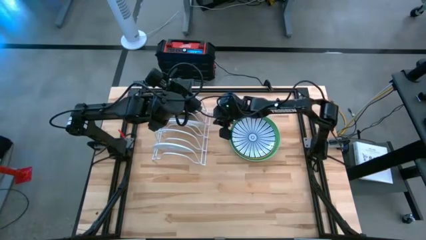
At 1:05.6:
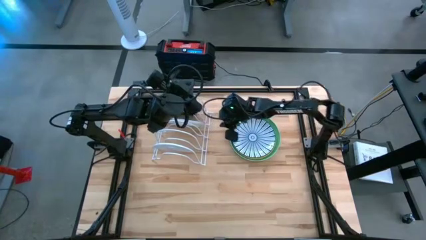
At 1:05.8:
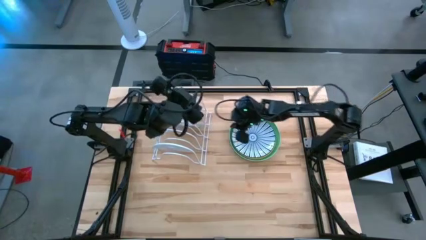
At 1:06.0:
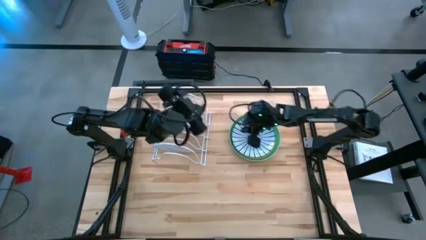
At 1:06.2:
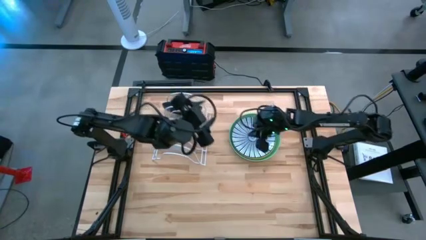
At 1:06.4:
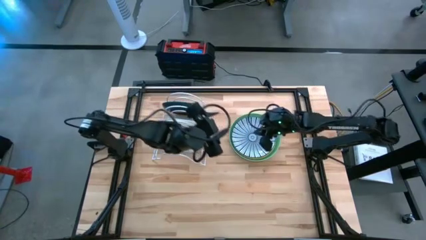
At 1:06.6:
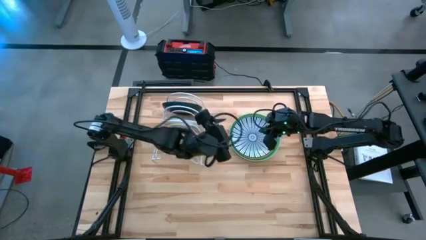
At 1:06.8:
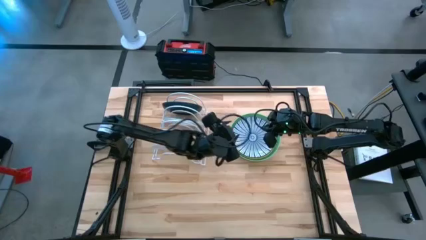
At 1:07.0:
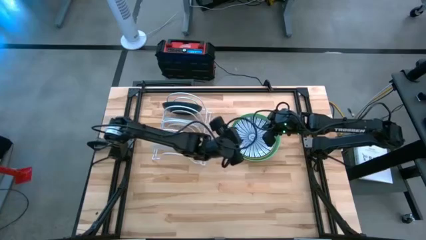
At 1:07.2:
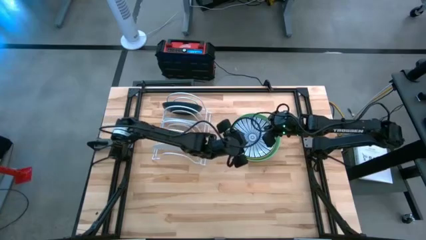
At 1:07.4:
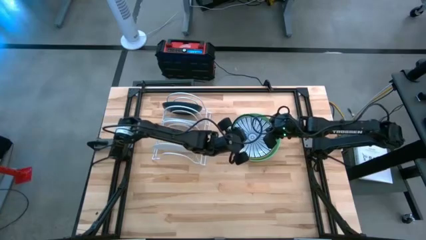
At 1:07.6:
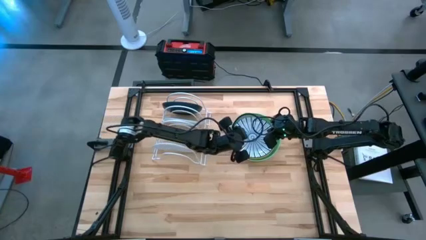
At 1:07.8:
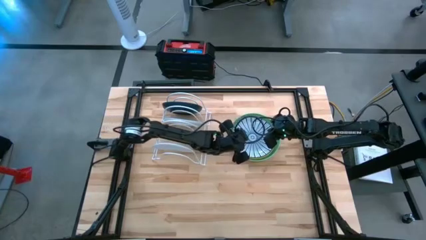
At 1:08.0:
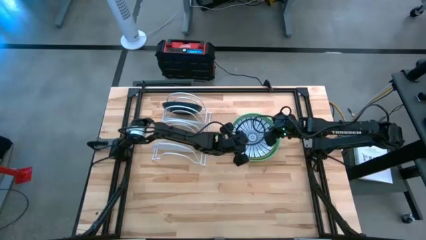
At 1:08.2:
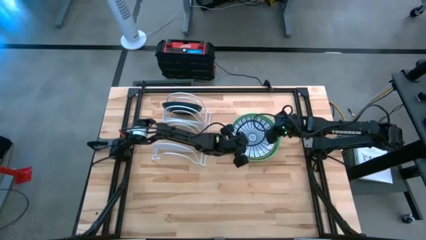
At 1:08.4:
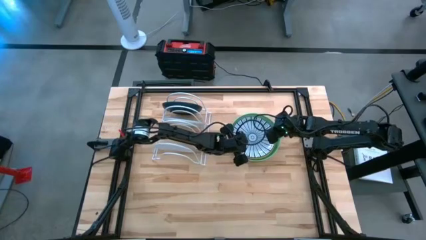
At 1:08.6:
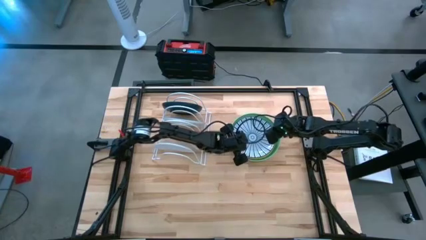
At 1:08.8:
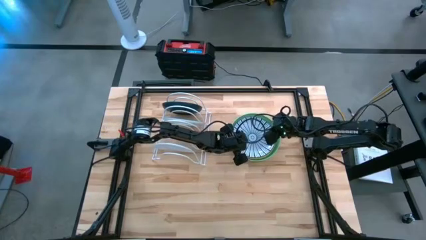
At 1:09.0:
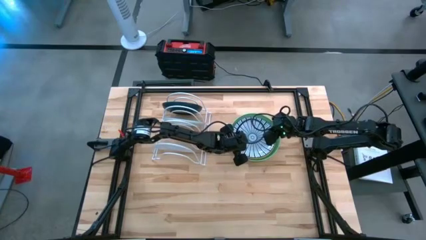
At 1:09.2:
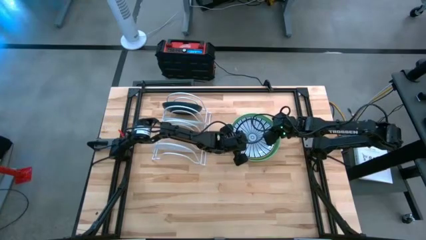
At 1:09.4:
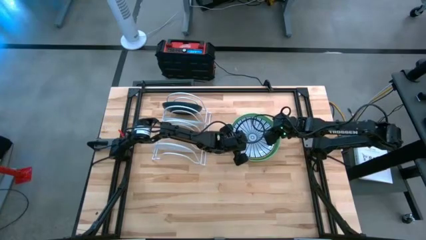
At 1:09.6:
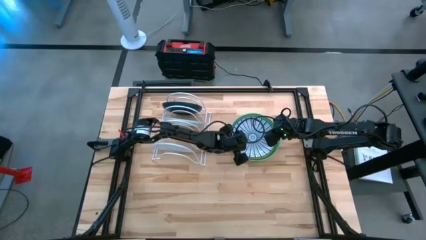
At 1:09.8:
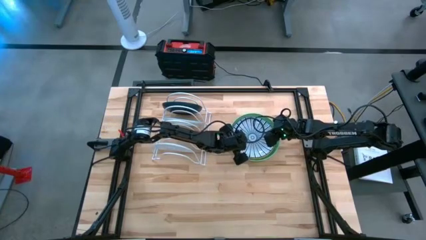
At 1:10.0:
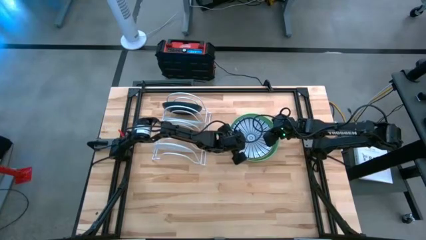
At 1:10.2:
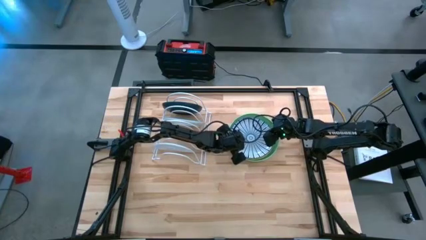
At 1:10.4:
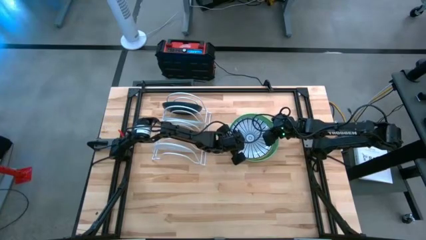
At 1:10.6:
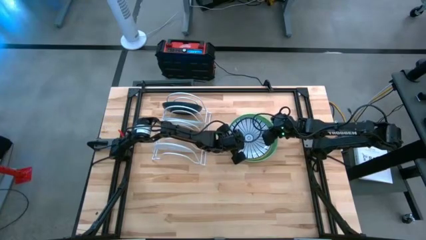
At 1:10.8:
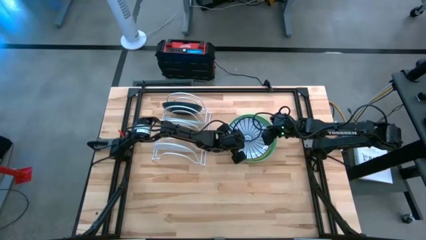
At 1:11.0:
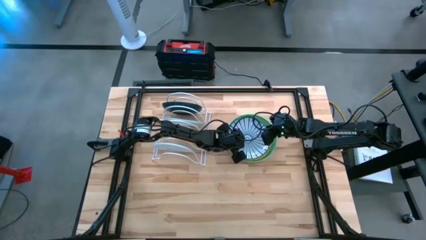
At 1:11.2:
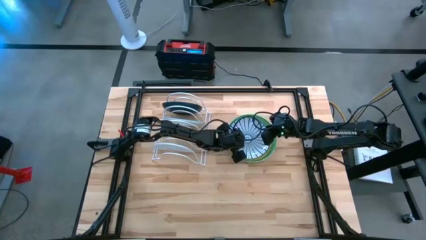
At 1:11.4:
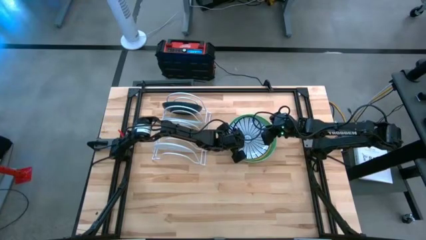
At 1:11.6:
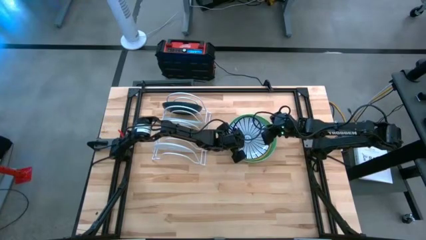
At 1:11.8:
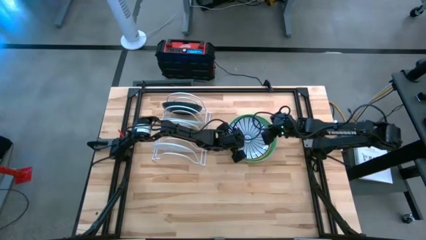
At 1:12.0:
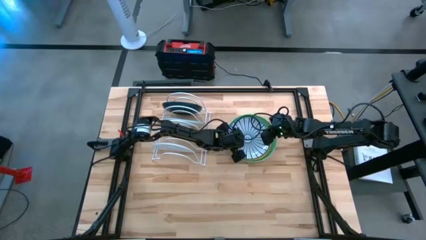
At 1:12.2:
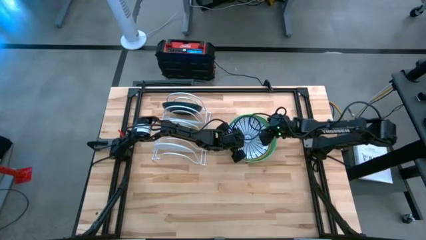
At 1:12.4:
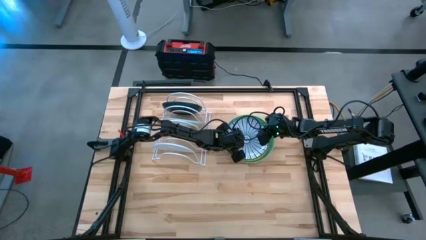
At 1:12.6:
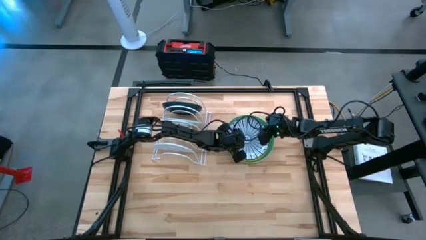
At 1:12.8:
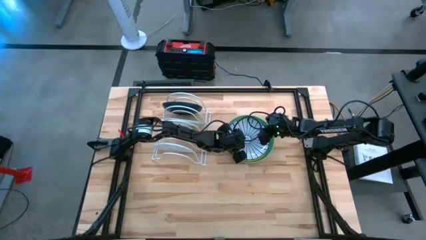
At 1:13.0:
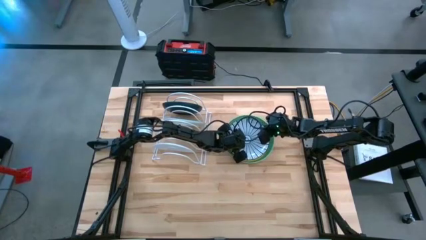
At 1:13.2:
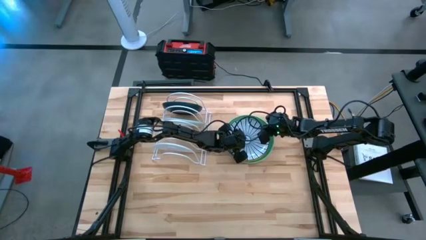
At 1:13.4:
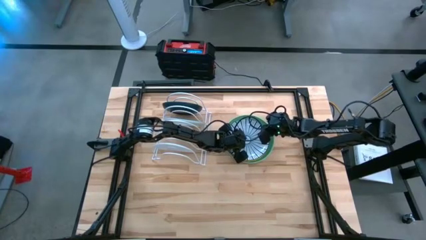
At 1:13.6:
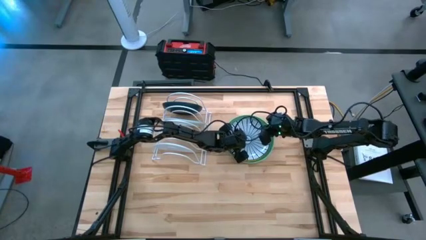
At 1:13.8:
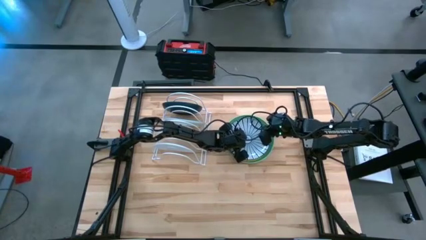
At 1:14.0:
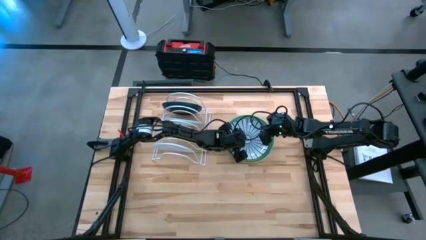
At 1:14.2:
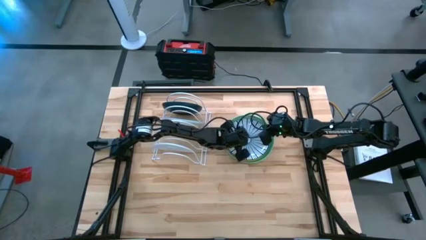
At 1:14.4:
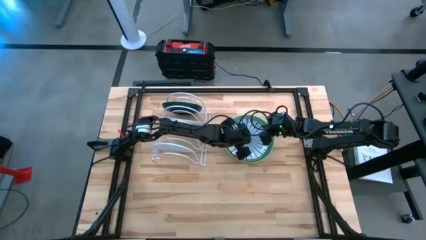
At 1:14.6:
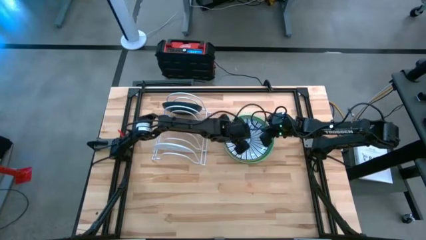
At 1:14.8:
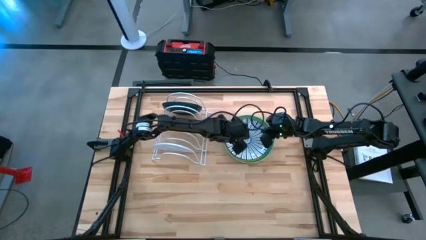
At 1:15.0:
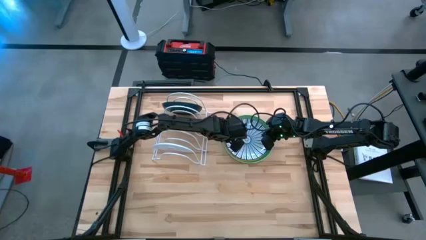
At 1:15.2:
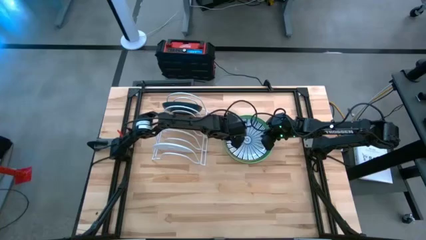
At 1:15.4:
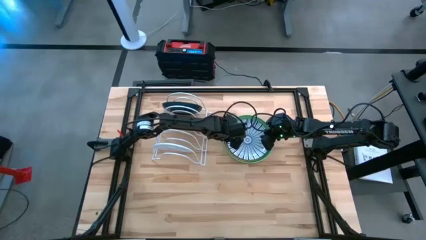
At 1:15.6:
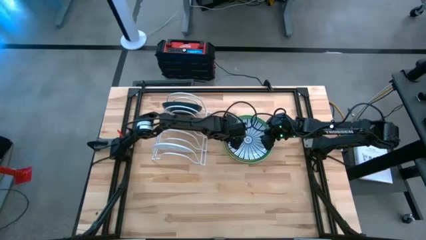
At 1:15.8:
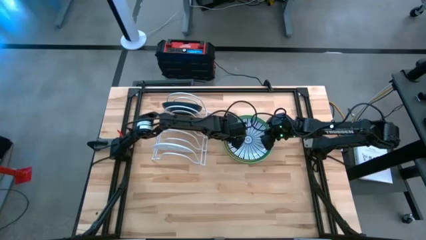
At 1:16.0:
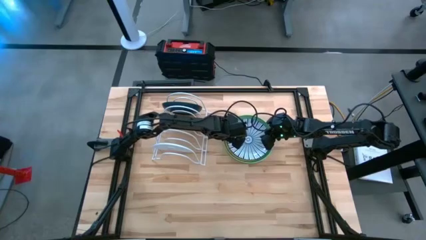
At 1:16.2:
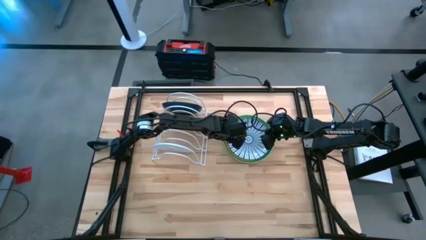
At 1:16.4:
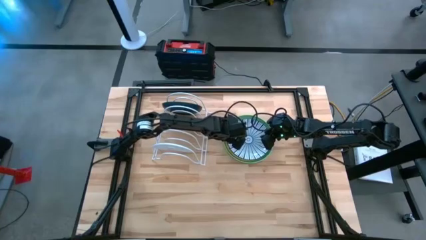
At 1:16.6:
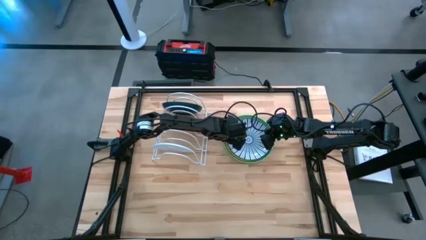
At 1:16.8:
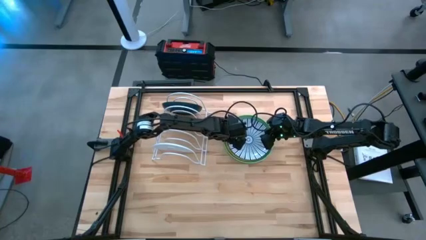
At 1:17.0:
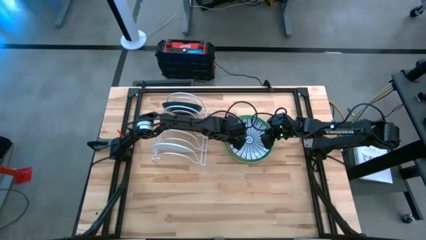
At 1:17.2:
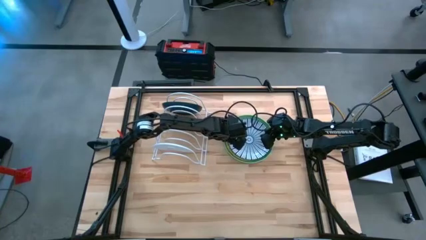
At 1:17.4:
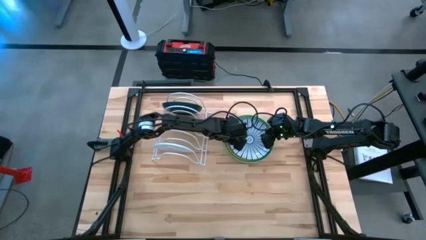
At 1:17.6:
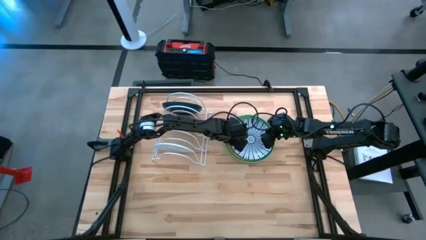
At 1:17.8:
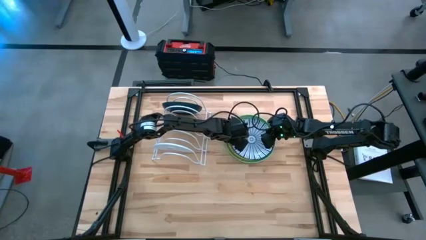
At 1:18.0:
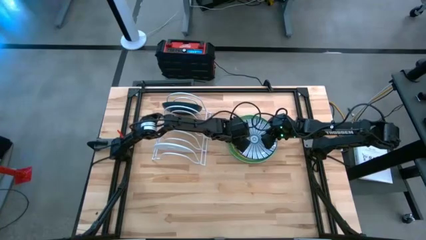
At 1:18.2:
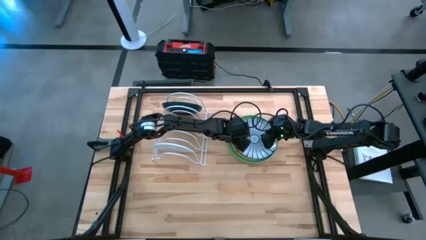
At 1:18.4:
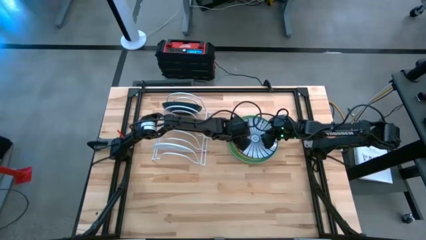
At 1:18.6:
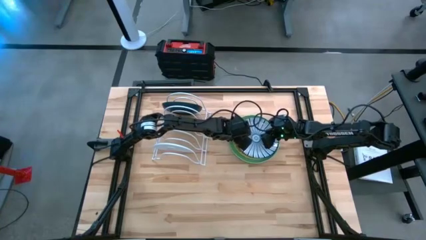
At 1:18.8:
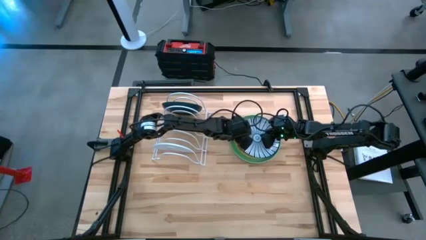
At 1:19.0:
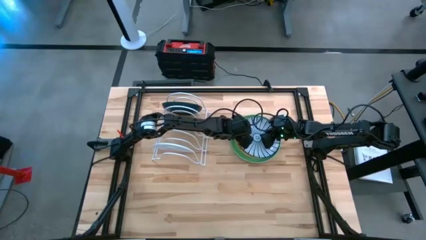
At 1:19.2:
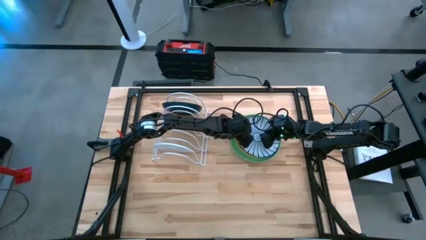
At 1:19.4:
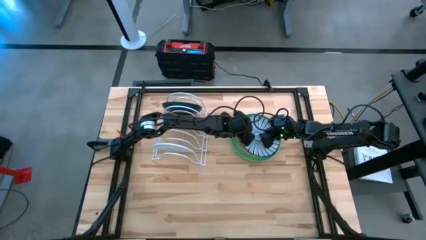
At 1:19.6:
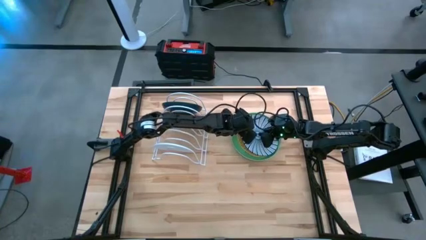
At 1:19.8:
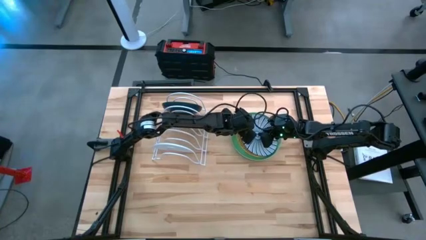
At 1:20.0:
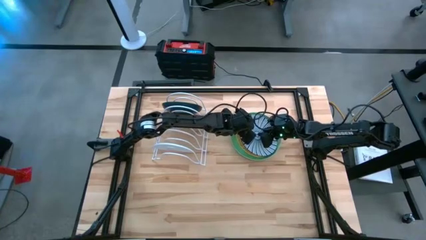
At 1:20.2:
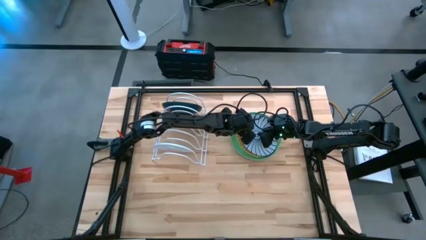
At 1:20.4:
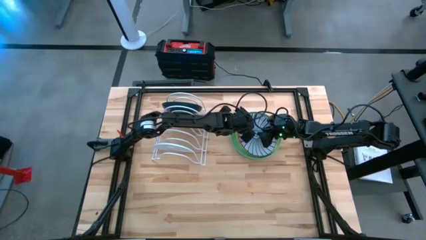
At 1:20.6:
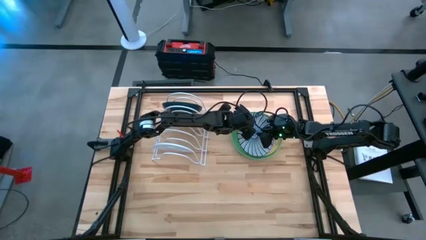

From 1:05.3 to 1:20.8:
Task: Sort dishes
Put the blue pattern plate in the dish rack
